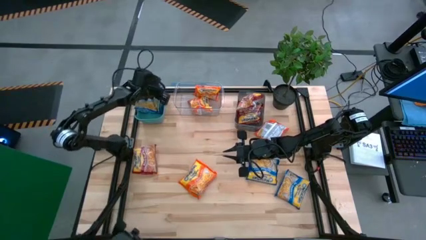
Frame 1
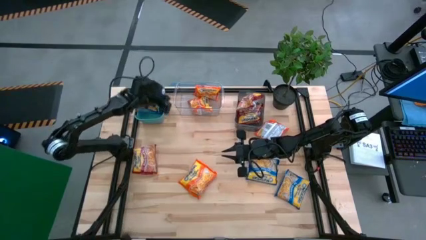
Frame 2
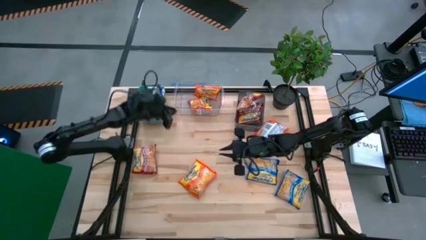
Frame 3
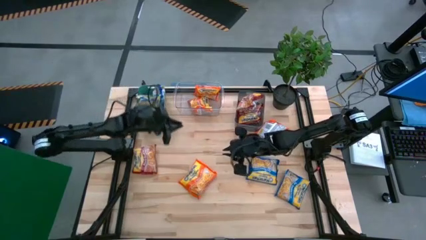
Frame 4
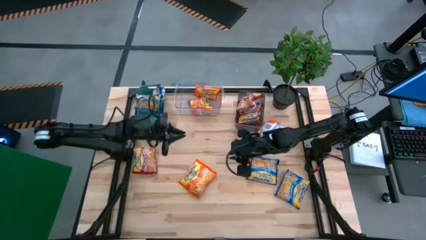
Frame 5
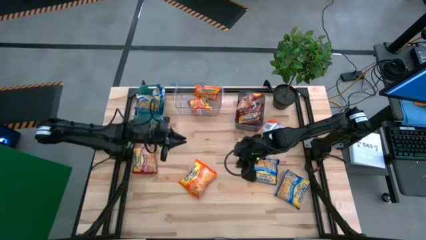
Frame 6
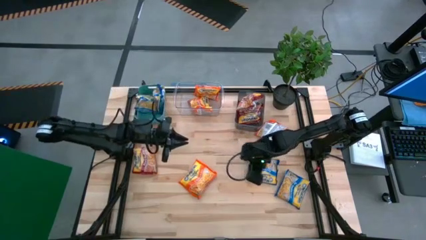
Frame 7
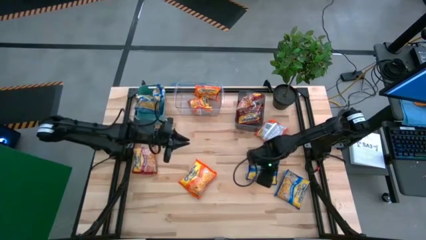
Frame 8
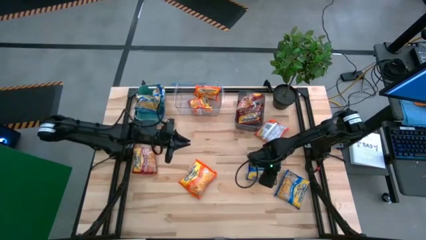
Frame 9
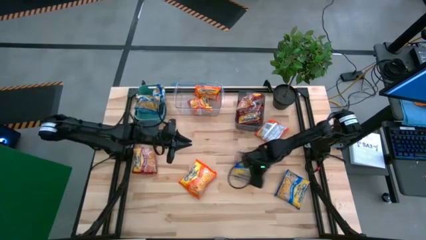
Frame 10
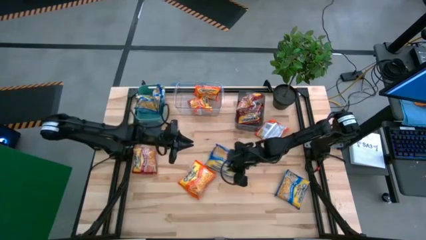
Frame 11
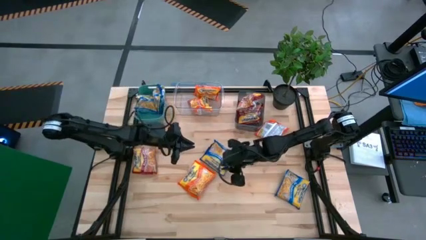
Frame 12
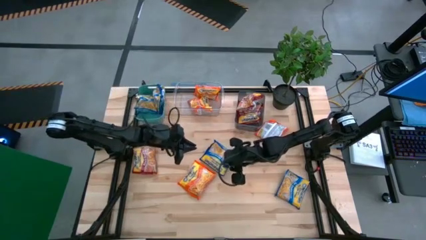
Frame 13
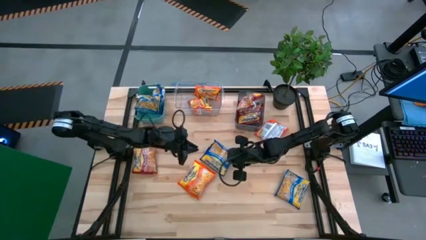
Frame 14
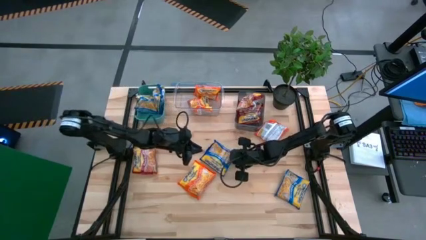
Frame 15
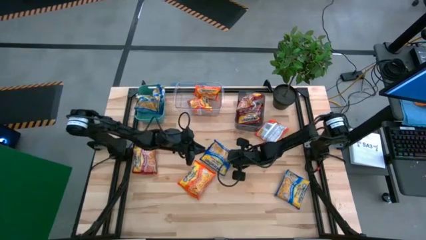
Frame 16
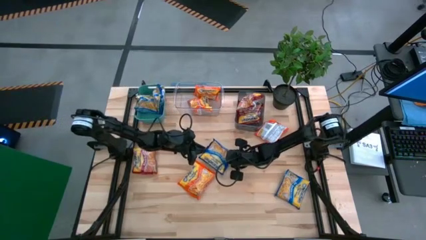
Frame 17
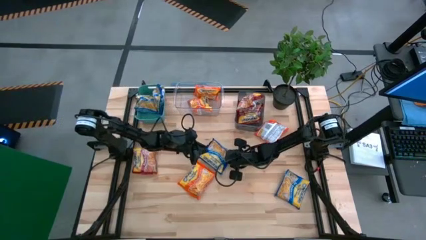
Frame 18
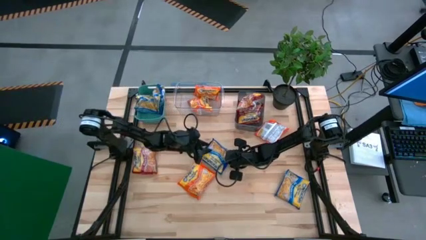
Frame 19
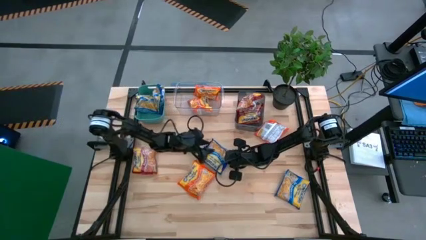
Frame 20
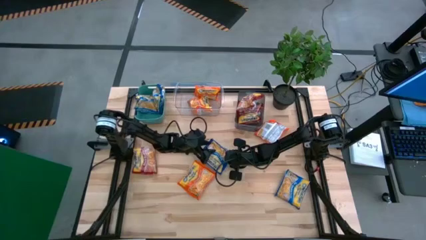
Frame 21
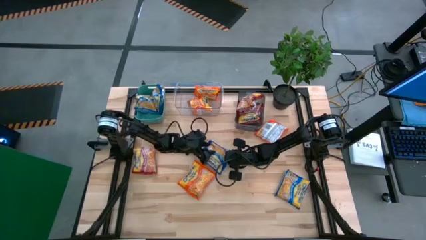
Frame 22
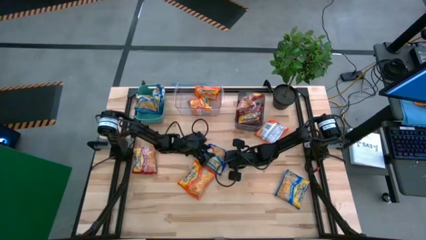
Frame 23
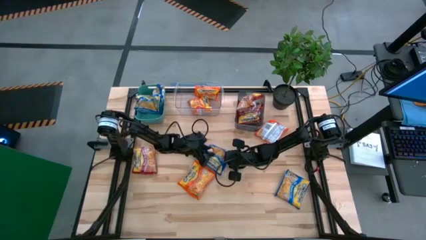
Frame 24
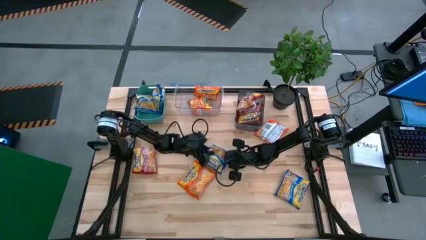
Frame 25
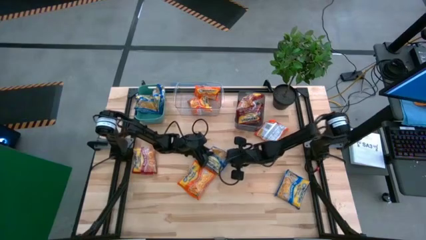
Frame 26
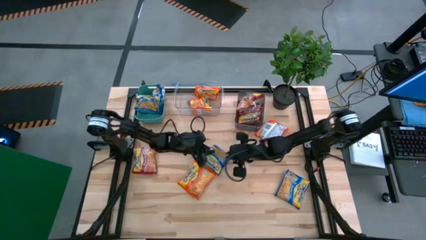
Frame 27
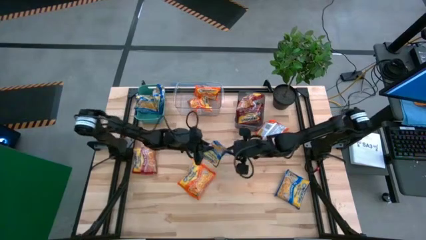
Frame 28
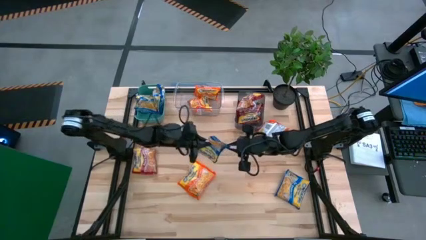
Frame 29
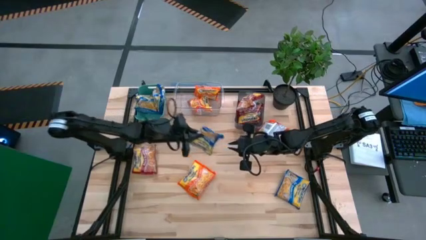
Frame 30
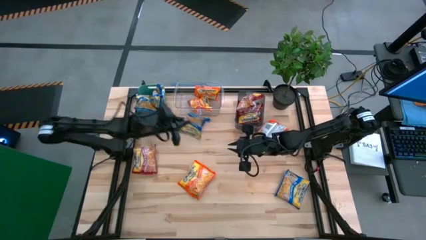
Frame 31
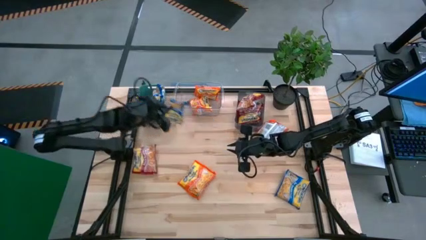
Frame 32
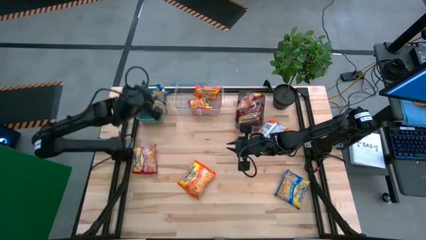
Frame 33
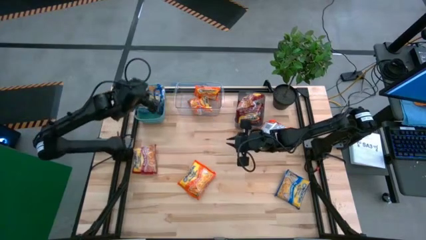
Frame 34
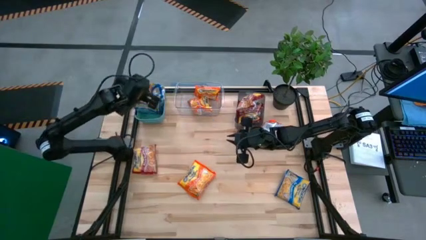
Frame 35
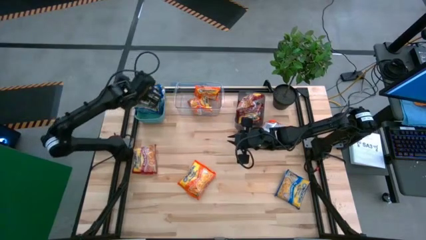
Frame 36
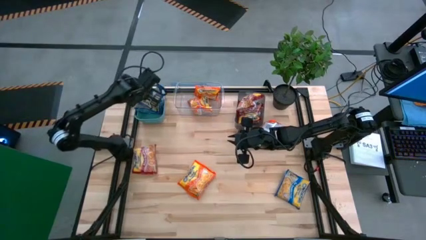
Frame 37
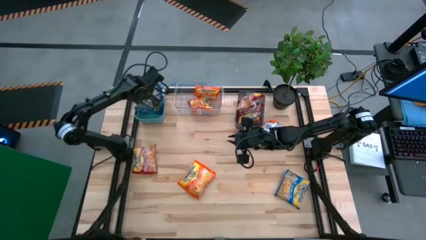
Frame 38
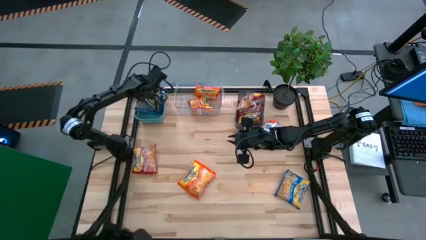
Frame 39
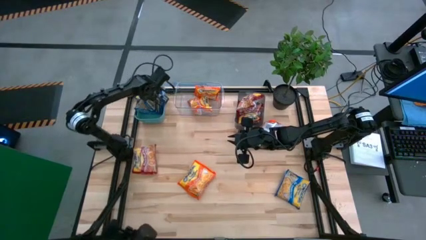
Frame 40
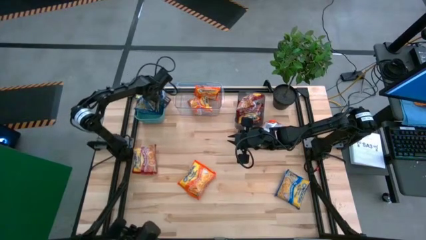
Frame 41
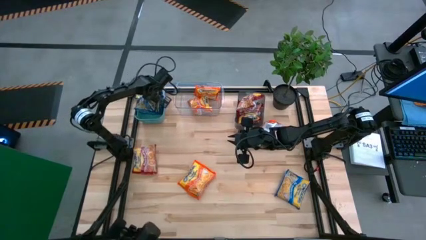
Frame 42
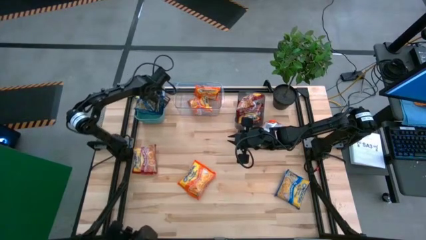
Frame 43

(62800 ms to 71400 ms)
Task: Sort Maruchan noodles
Put the blue noodle pack into the green bin

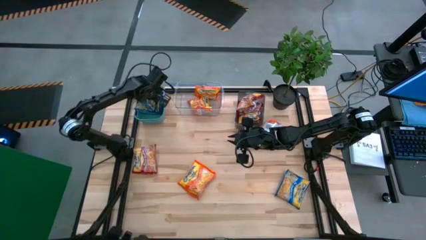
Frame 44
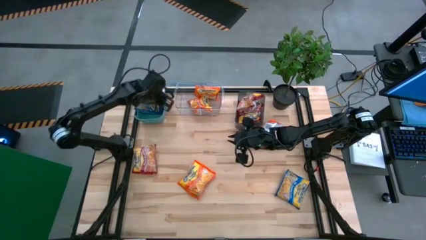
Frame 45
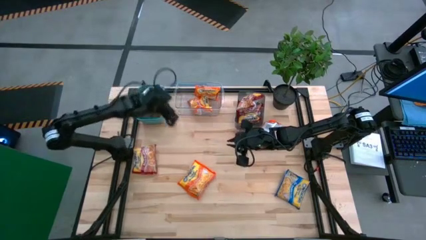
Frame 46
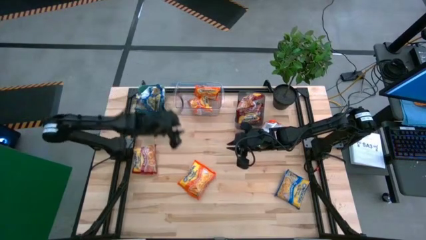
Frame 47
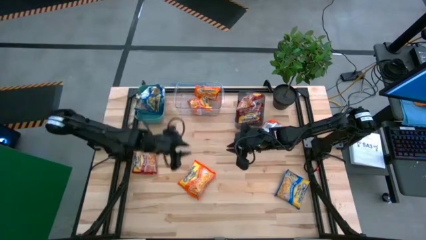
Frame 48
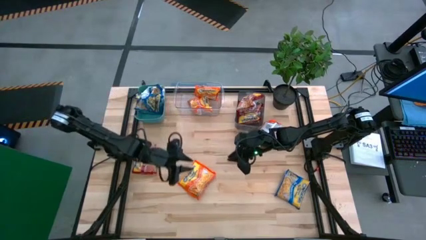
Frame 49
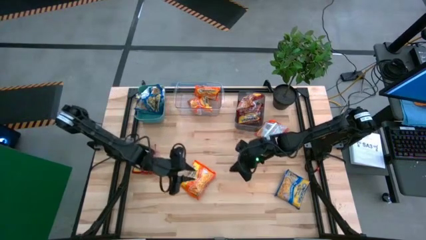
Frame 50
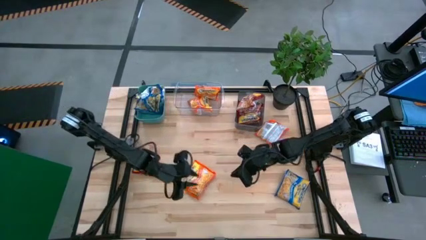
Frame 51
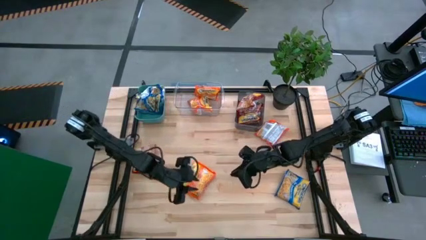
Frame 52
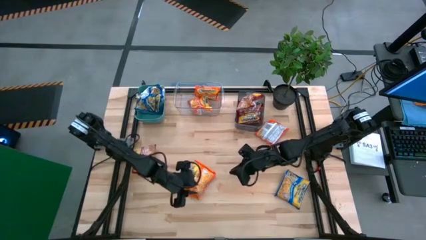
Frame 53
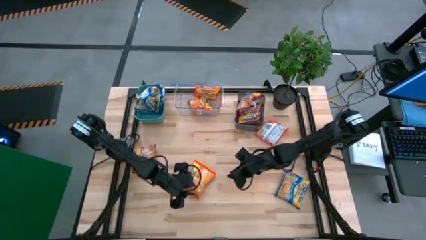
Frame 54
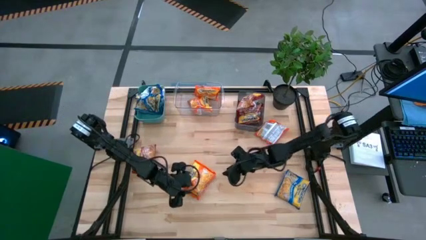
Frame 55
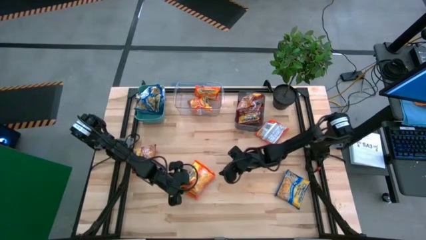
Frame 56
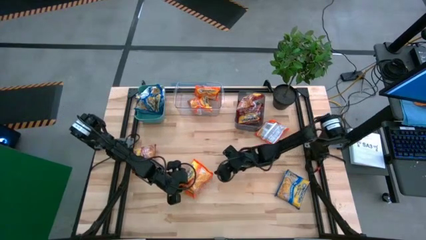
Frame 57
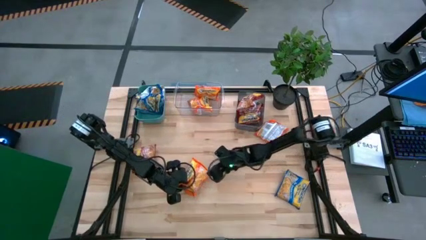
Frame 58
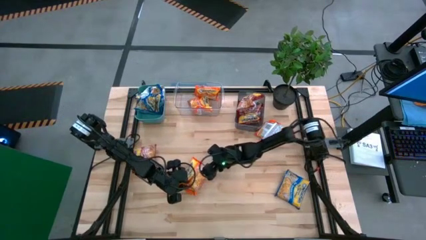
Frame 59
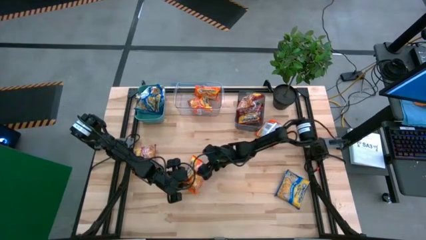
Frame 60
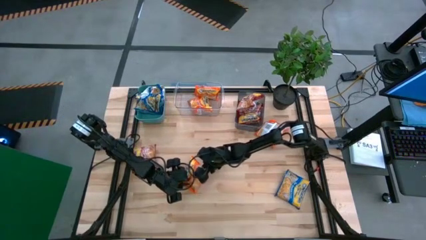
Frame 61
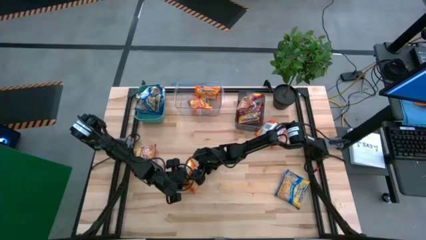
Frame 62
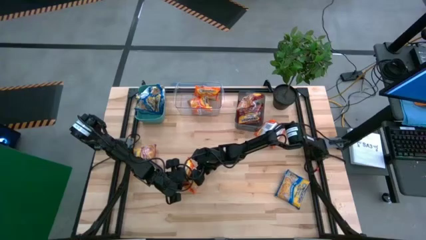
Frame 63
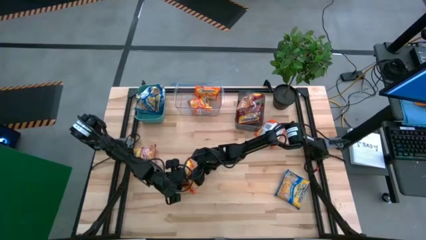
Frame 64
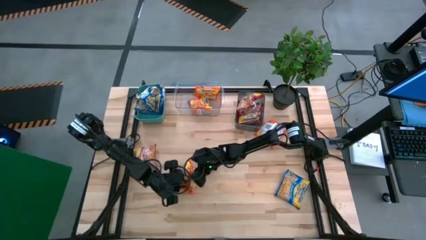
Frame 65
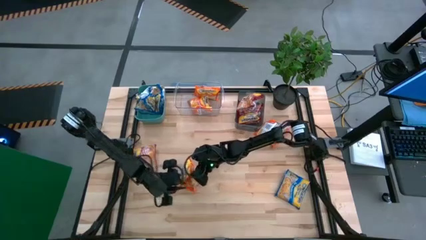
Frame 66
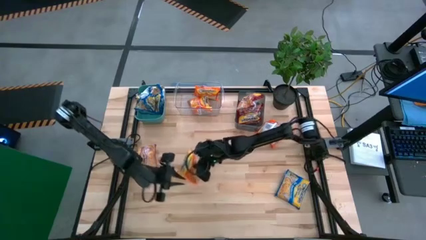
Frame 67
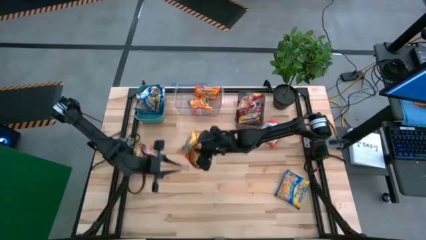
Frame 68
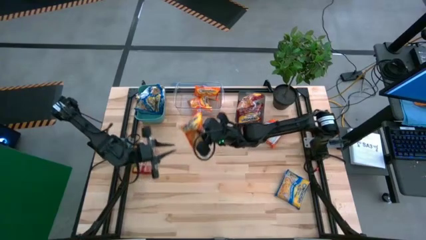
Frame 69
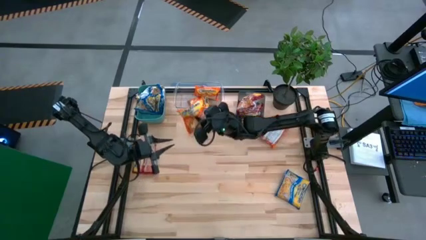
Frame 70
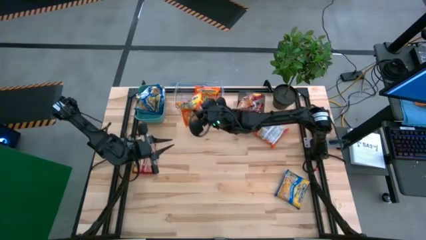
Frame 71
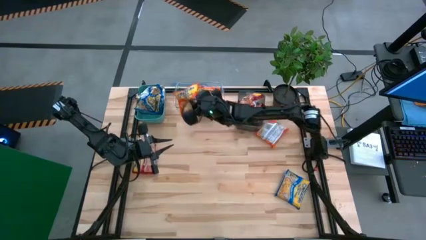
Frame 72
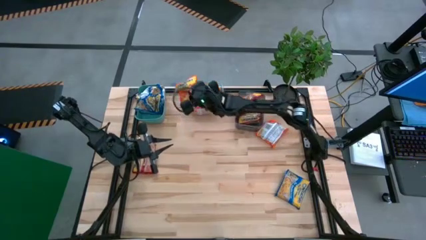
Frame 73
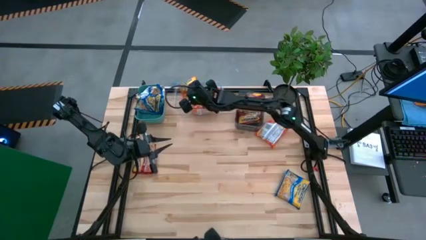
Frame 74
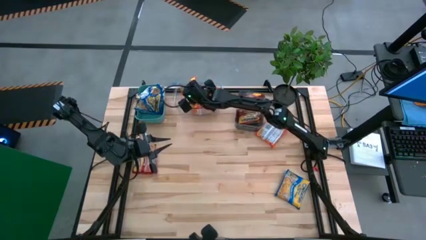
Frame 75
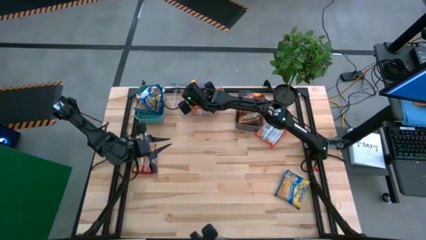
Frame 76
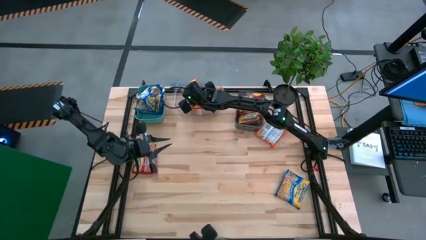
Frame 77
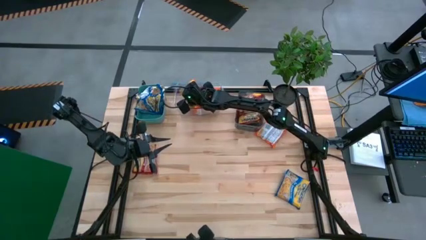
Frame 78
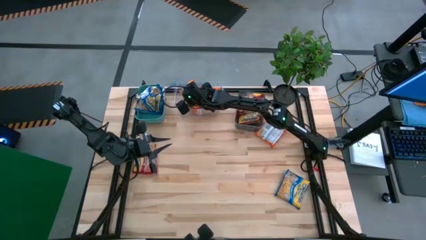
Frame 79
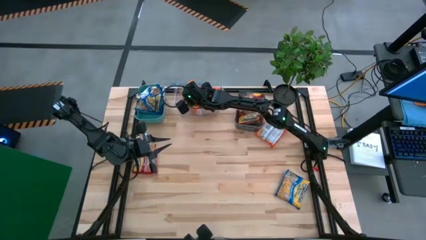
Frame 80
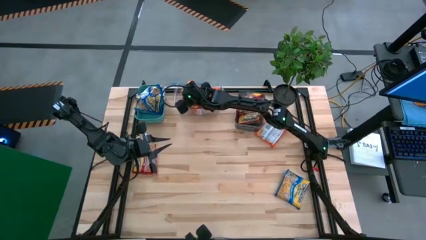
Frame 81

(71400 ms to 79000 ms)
Put the orange noodle pack into the transparent bin
